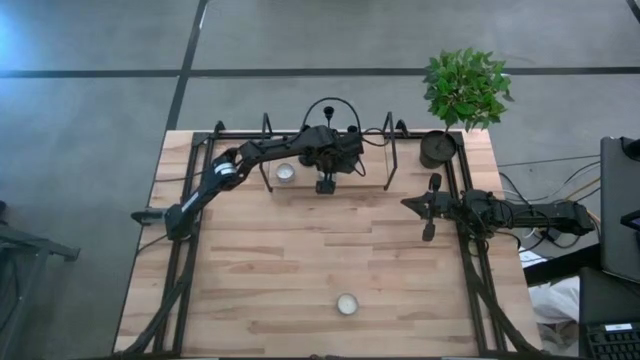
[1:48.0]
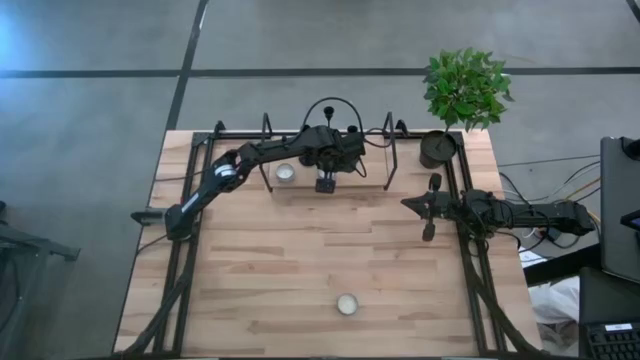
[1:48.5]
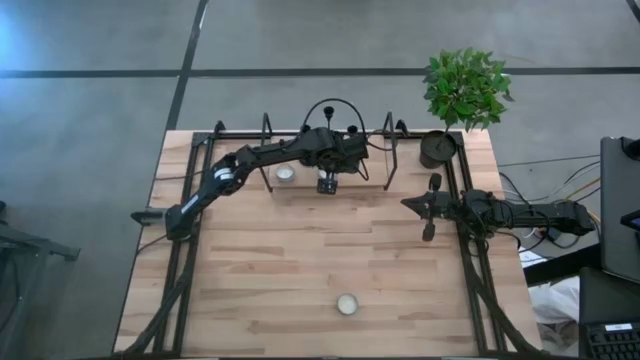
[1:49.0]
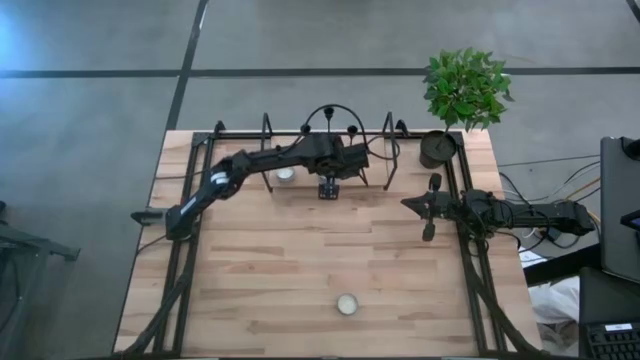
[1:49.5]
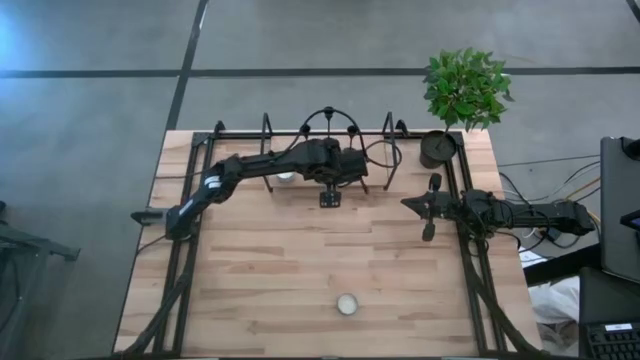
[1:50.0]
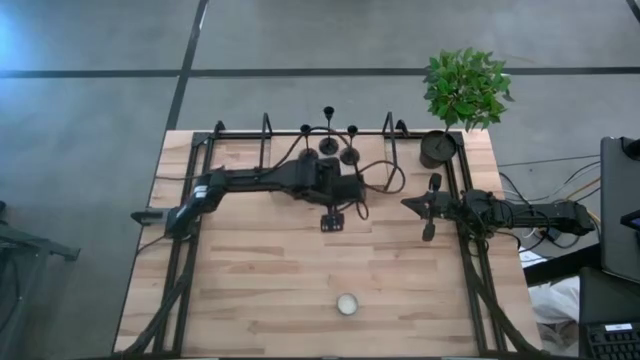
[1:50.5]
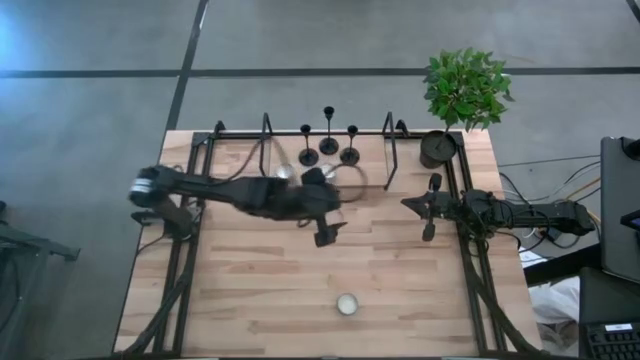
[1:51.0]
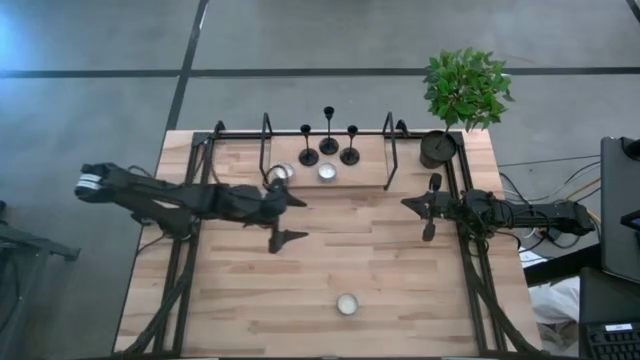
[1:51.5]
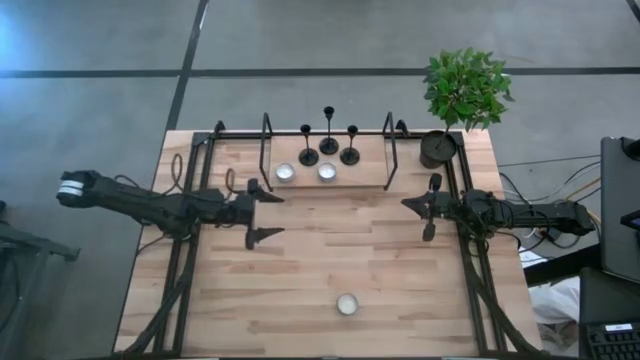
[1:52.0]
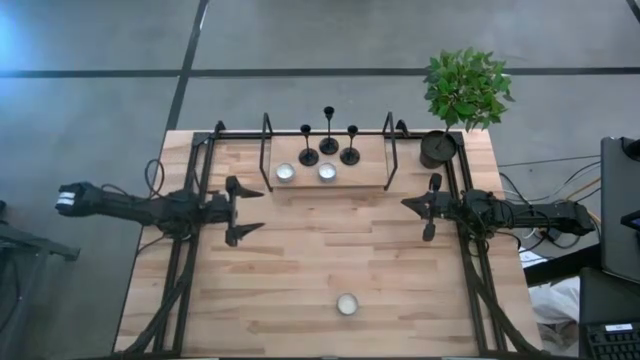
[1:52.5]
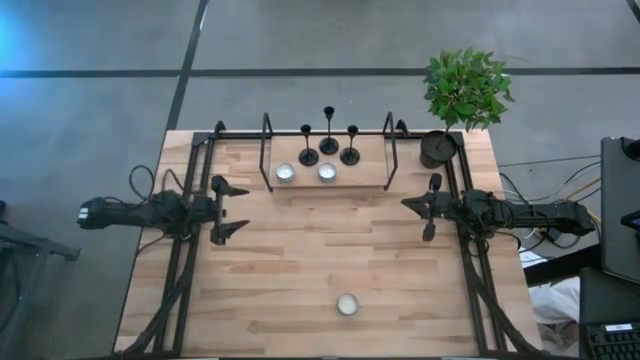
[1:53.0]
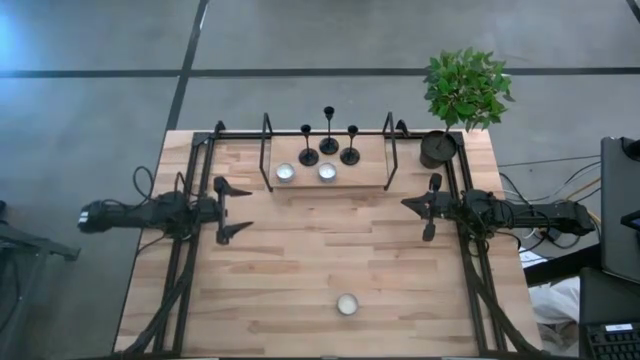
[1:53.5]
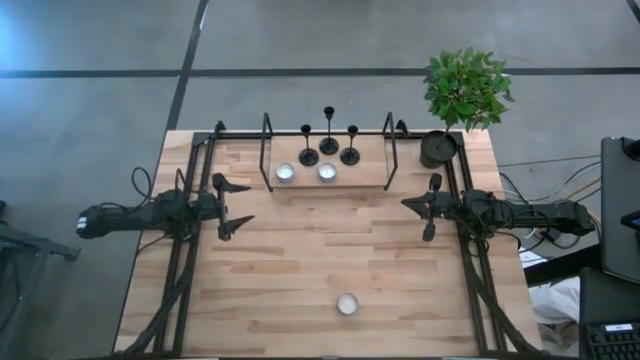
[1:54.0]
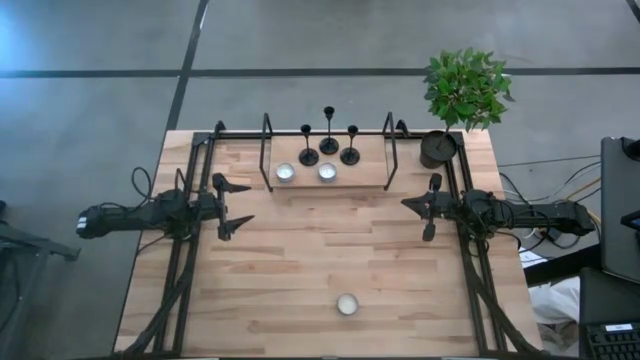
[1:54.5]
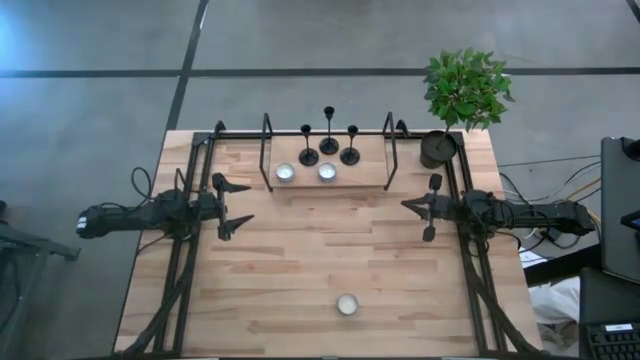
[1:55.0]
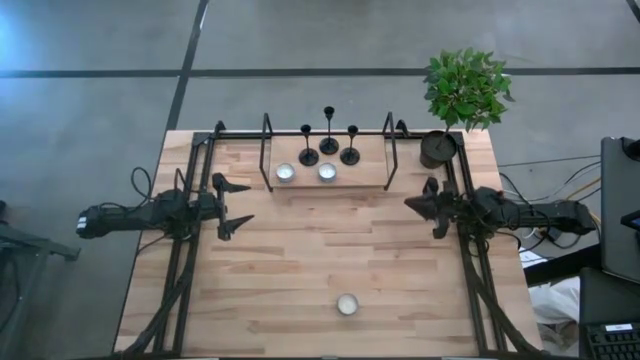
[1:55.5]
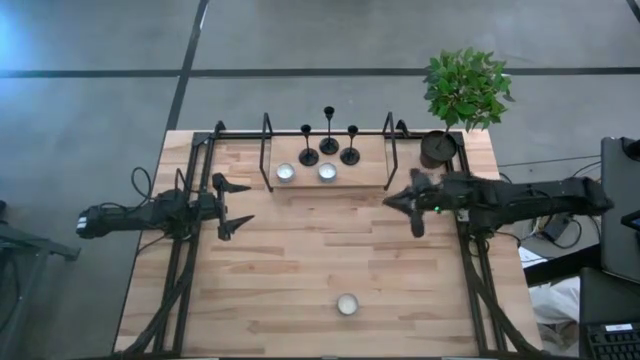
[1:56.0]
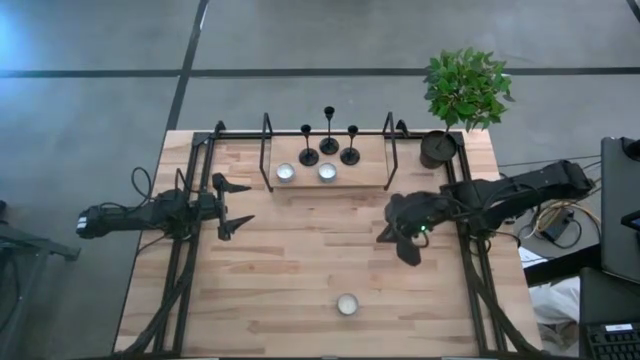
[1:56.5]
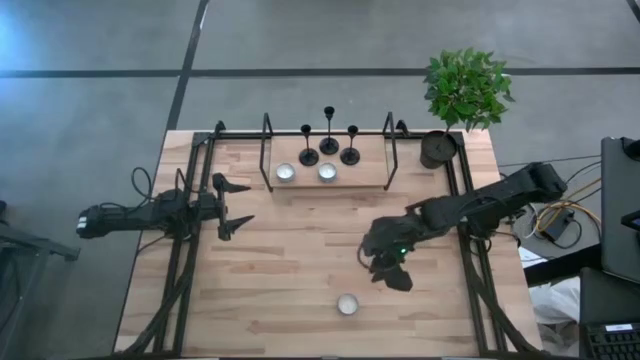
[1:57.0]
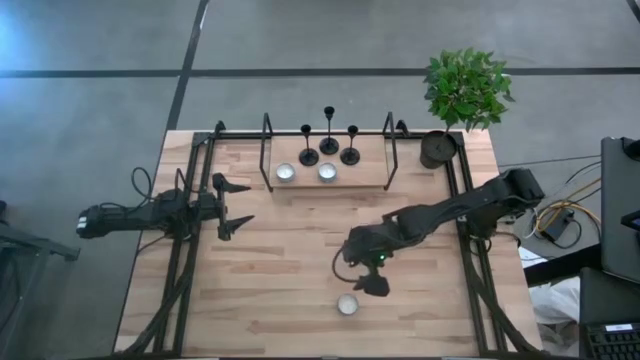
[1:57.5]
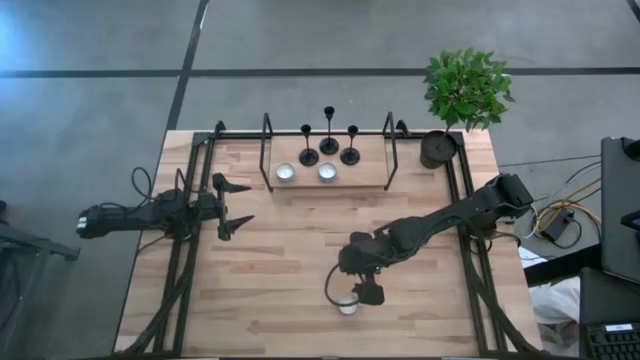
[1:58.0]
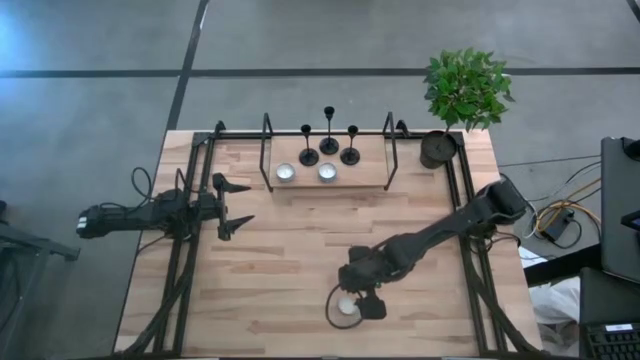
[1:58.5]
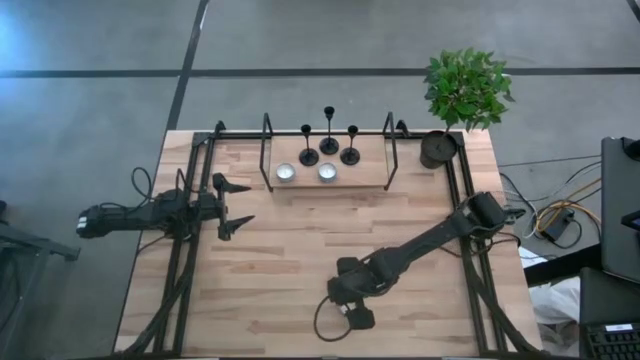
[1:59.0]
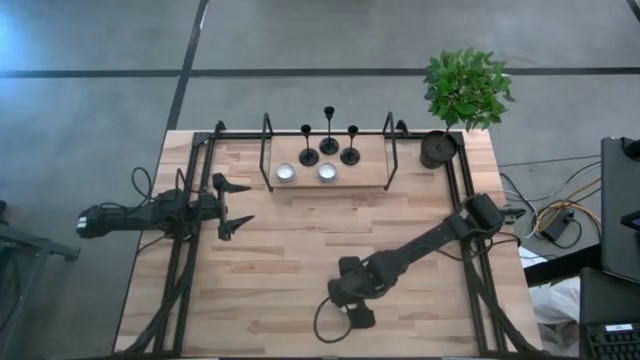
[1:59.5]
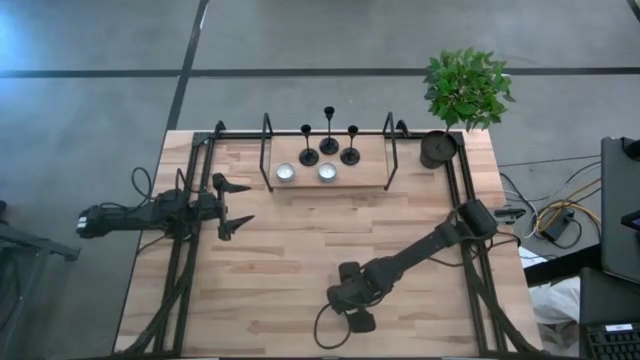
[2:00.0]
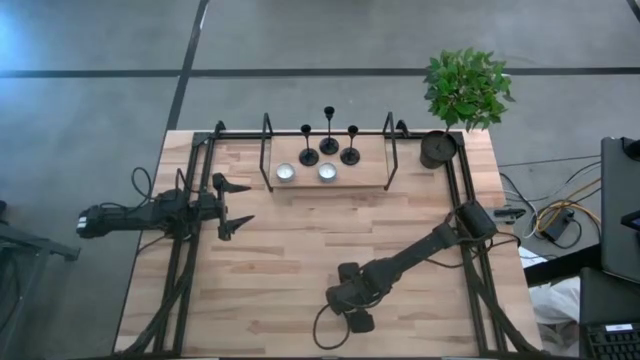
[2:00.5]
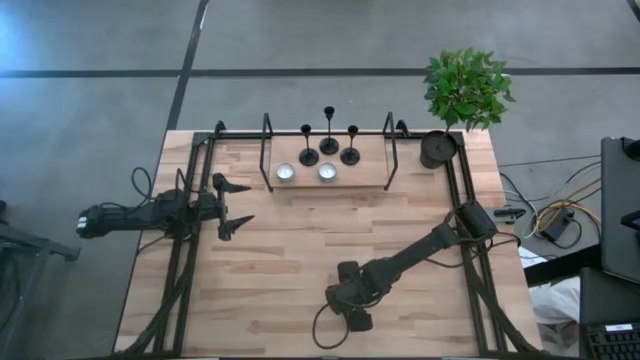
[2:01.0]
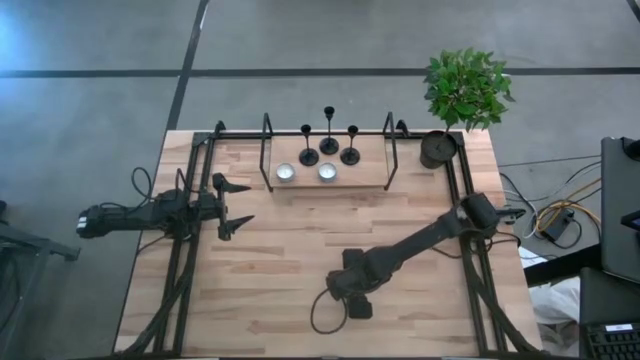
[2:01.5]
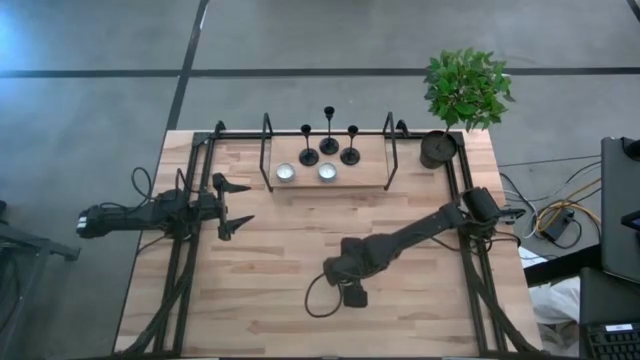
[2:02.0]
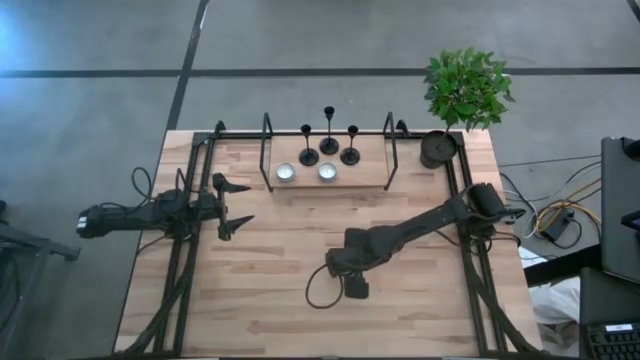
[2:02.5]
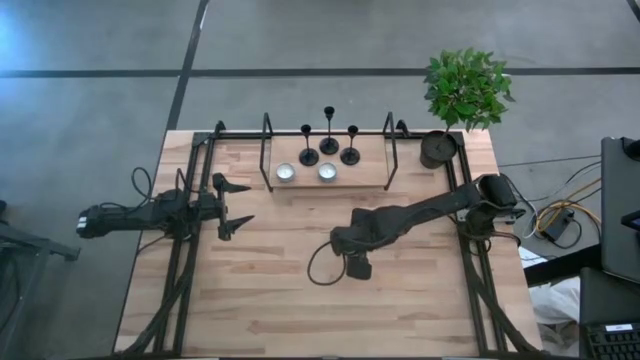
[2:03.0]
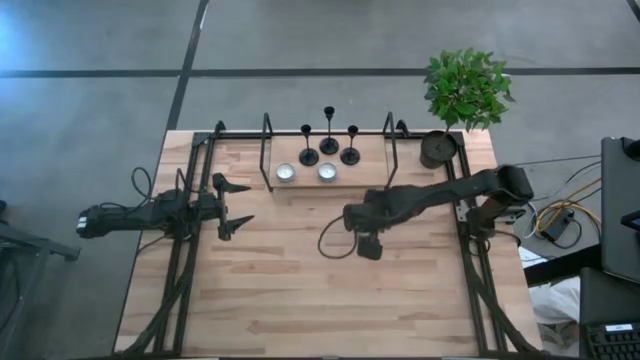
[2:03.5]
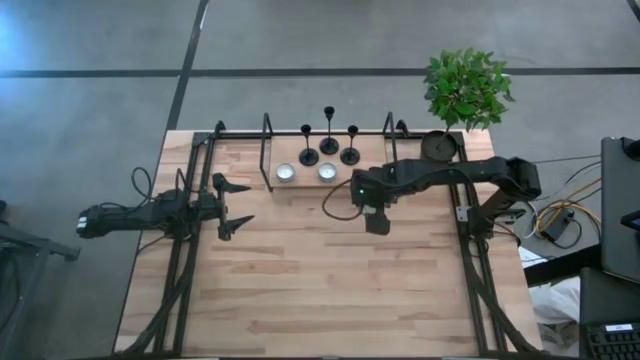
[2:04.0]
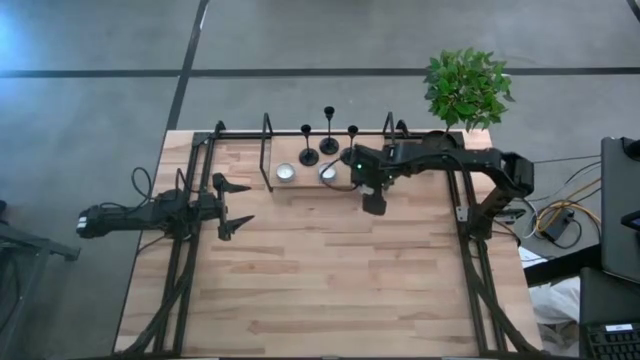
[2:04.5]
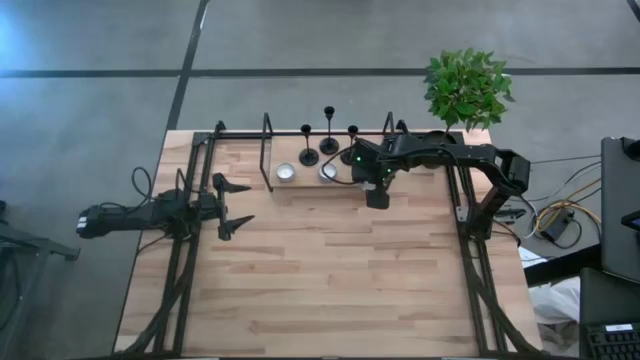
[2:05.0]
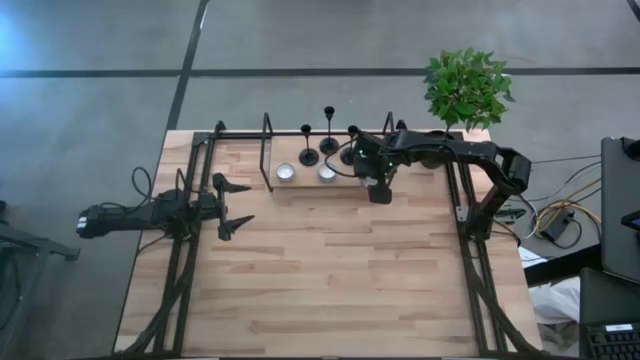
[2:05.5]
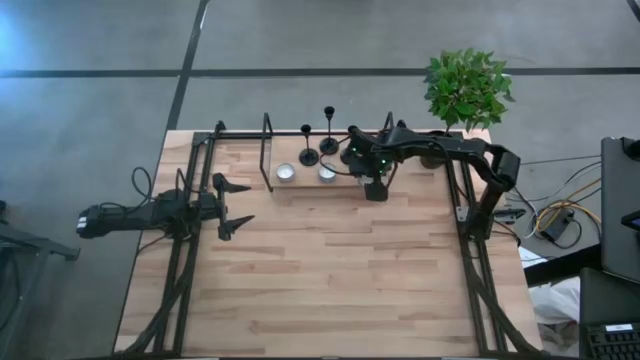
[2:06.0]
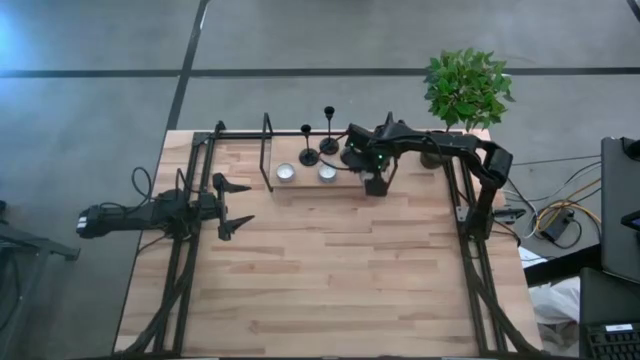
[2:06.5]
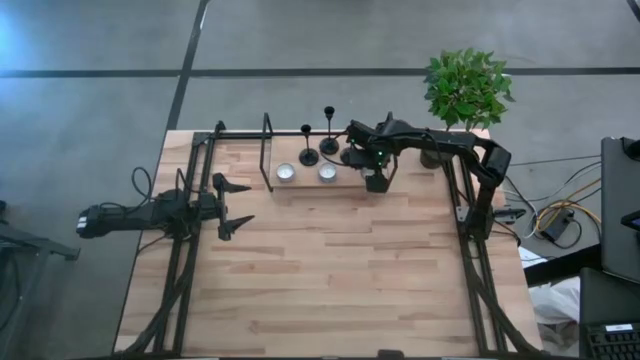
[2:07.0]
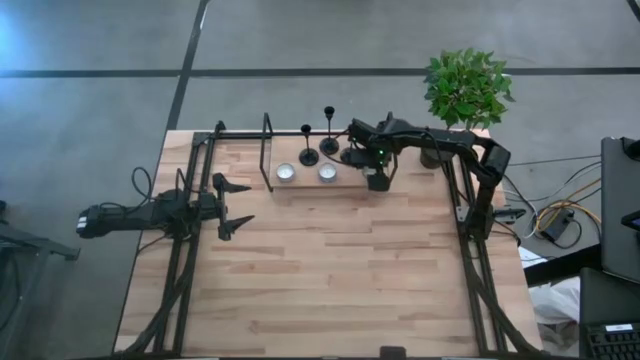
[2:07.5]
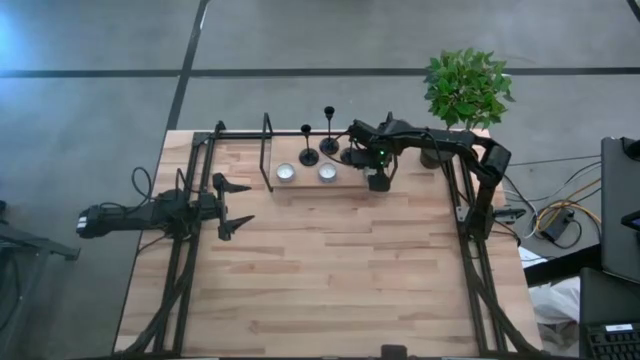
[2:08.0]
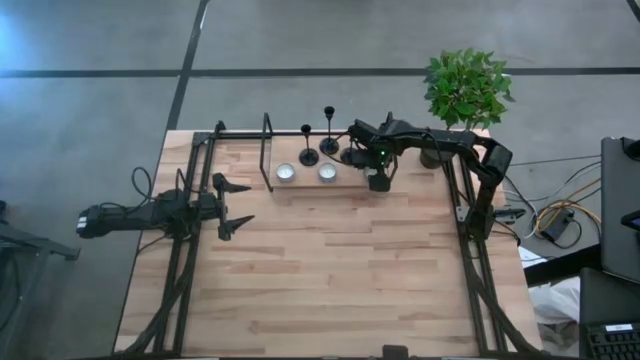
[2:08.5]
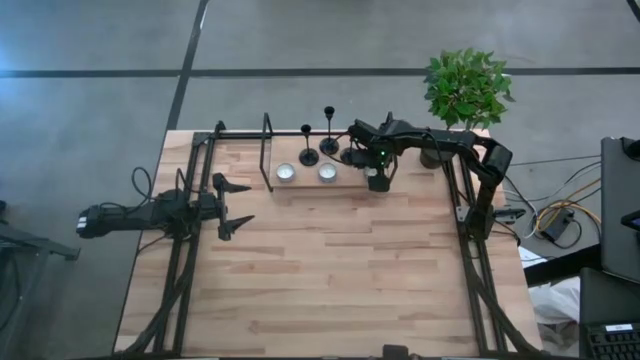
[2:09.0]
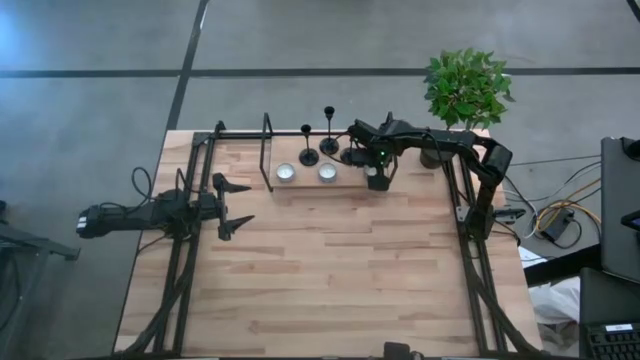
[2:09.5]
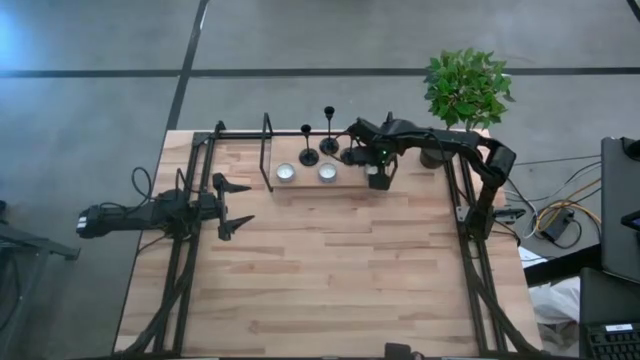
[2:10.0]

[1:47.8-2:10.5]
Task: Pick & Place candle stick holders
Put the pink scented candle on the shelf
